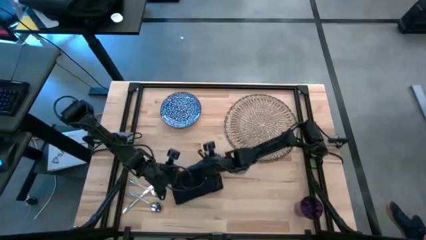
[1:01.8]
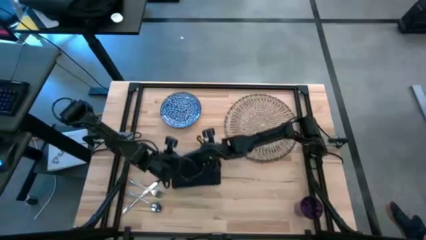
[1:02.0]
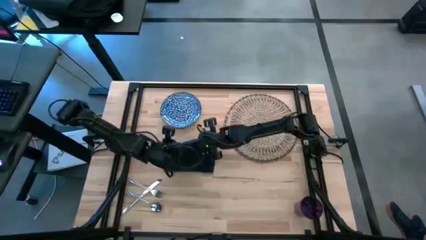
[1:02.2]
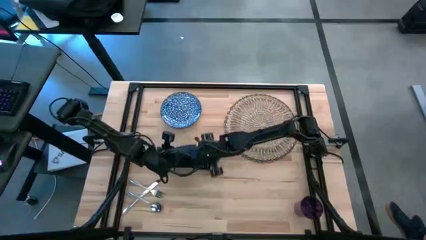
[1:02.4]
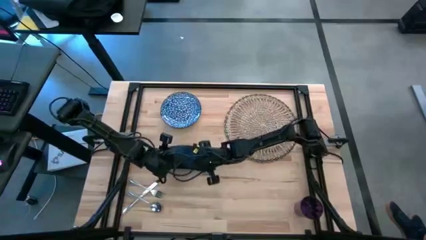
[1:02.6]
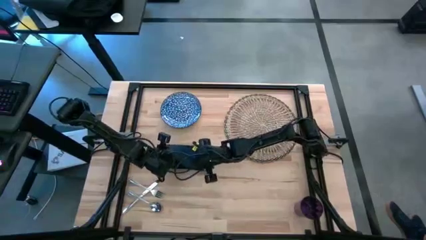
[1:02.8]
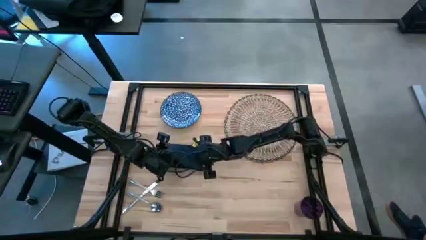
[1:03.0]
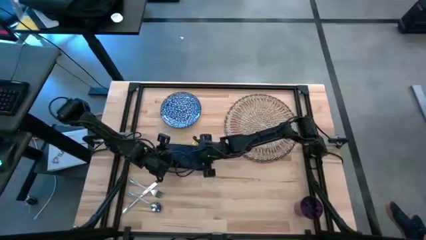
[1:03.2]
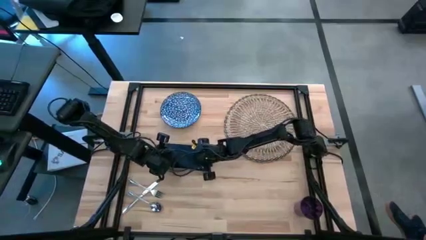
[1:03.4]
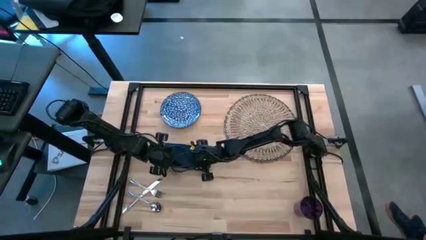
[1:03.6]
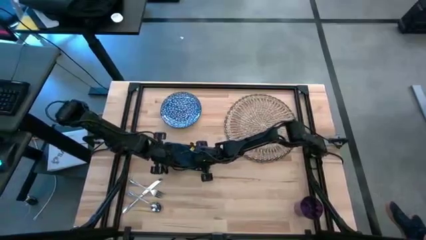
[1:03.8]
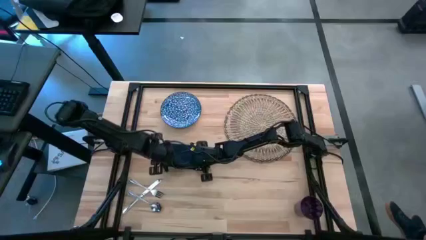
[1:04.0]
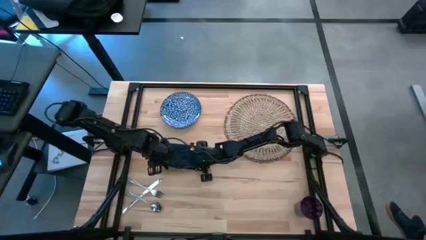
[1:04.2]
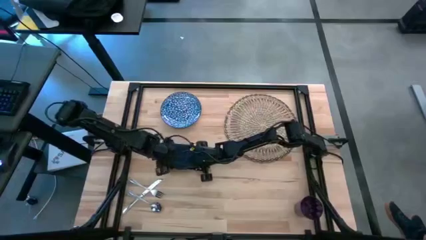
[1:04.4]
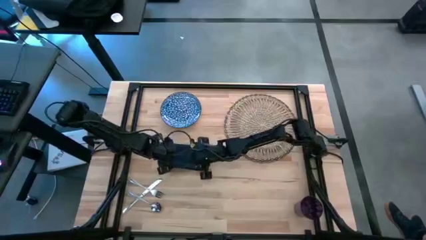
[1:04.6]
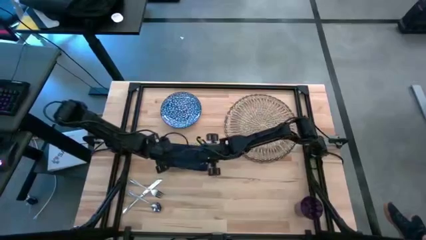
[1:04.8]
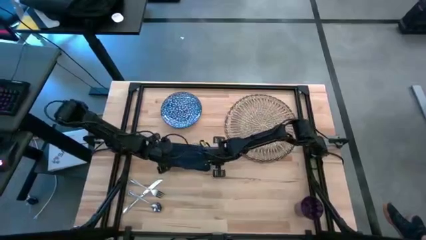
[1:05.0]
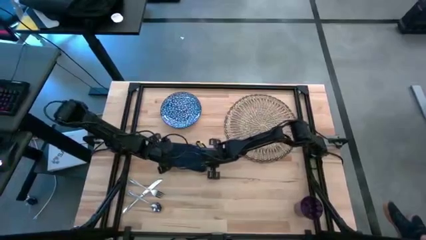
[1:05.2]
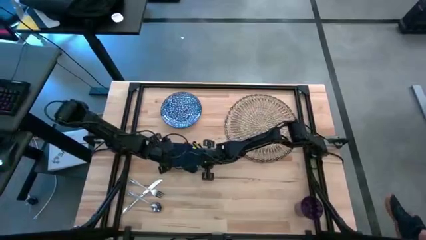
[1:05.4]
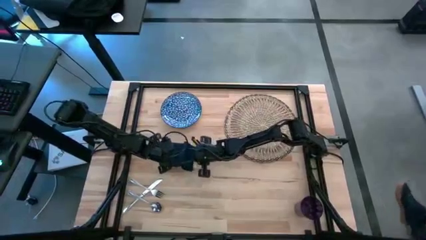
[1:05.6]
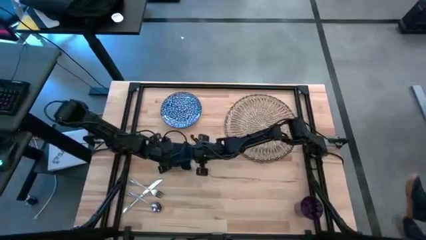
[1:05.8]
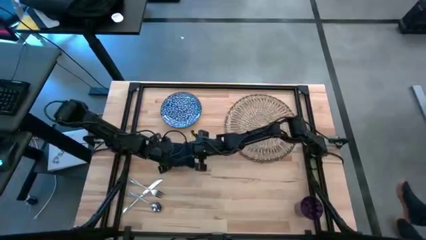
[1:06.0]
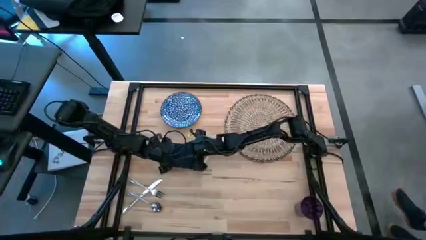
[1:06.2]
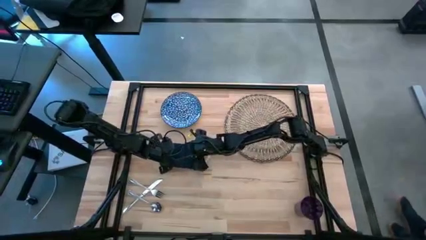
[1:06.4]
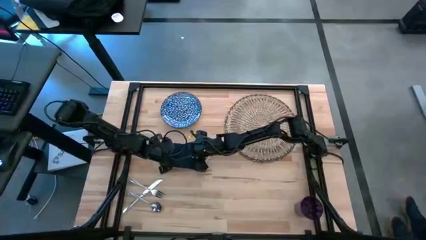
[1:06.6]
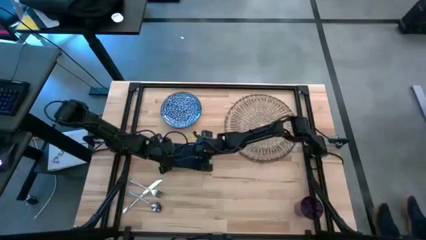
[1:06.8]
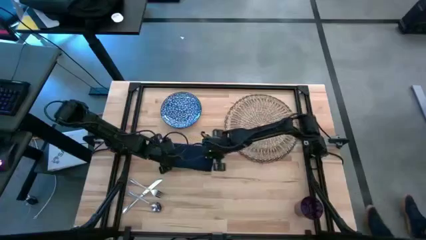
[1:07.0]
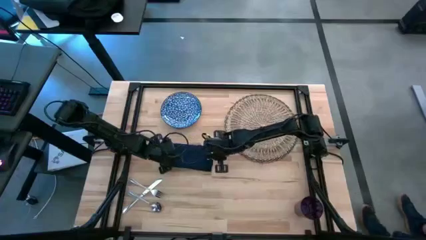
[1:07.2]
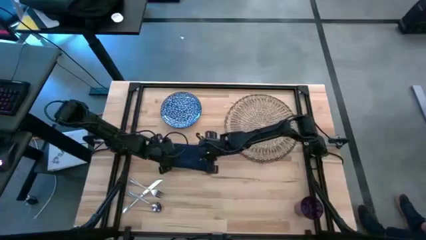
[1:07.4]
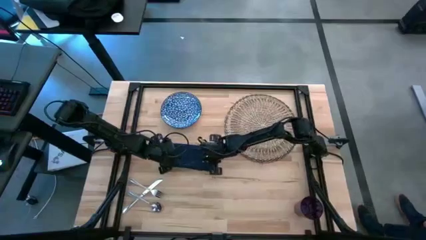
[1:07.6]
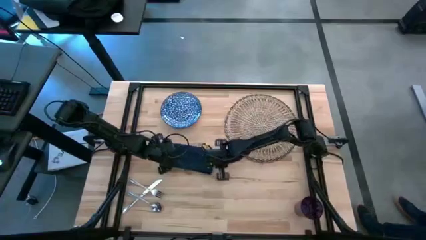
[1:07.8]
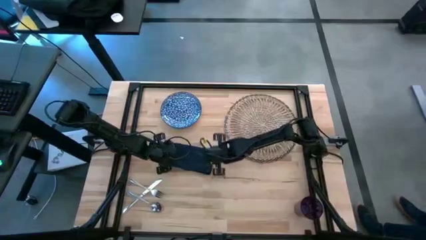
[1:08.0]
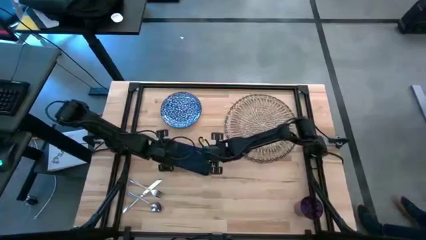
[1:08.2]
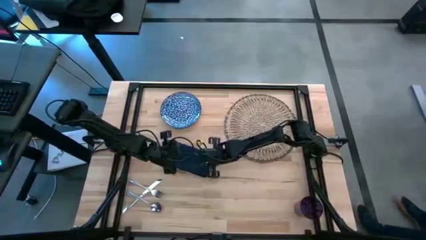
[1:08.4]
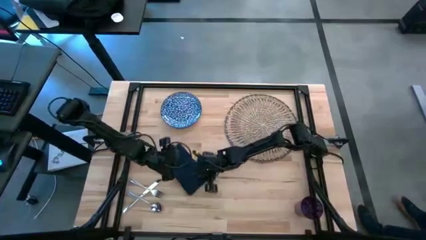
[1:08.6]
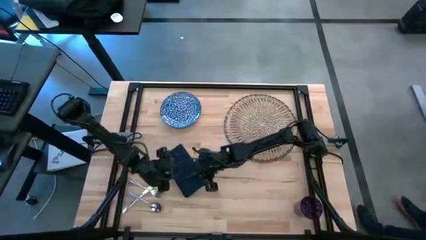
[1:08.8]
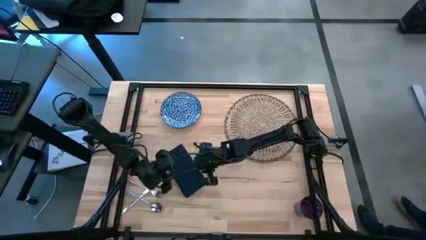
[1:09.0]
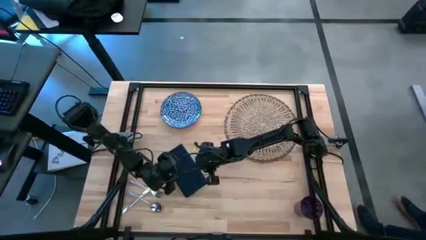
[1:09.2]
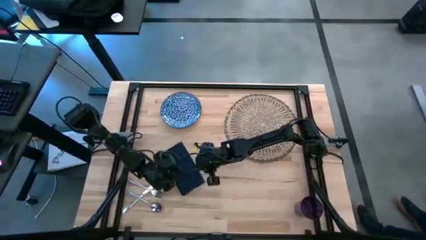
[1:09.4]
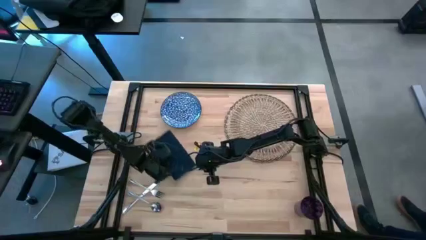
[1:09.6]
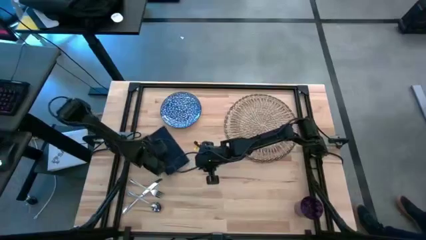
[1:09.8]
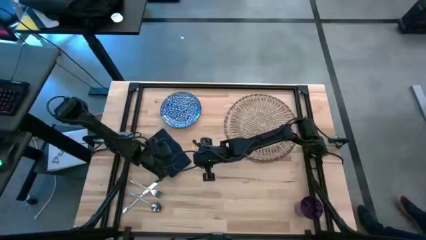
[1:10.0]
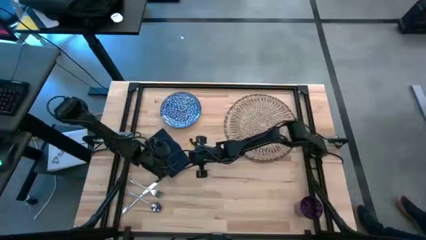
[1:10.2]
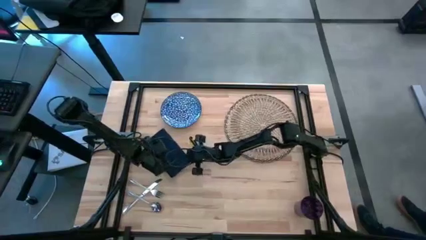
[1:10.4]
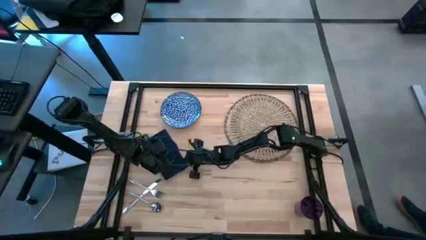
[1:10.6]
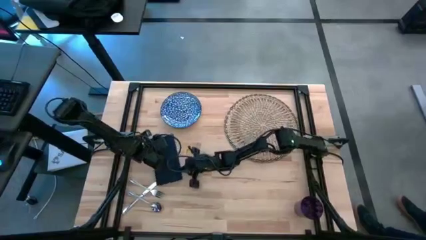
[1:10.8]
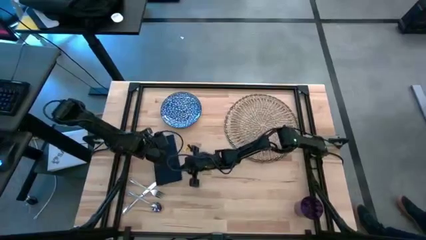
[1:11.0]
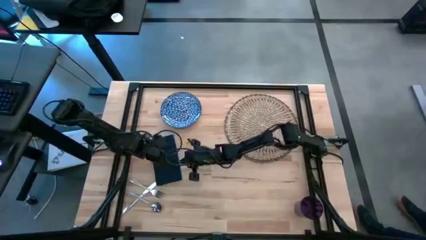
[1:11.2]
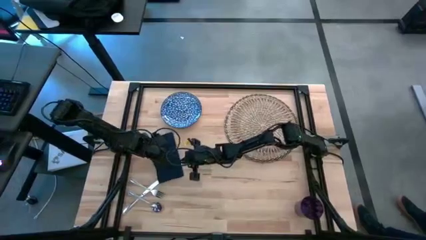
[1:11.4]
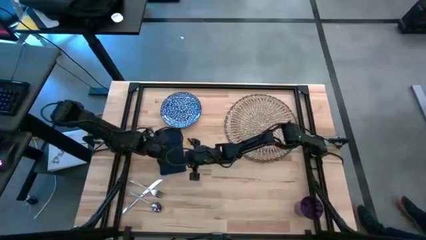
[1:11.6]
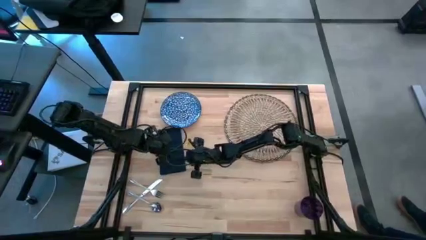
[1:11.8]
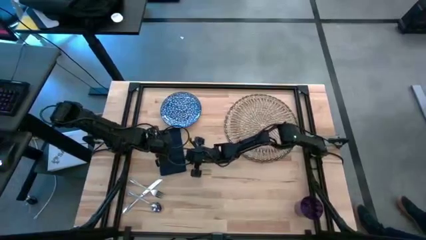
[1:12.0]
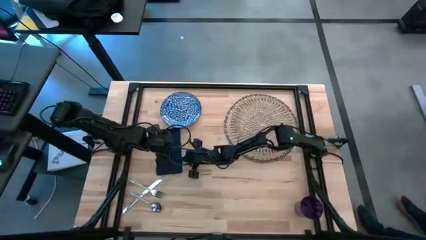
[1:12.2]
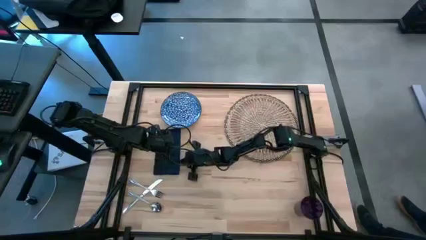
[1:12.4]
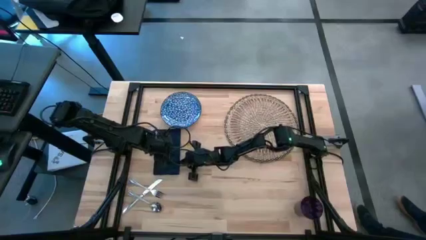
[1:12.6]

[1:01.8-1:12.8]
Task: Set table place
Fold the blue table napkin

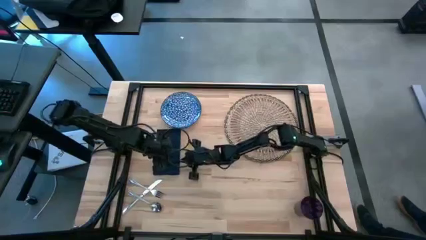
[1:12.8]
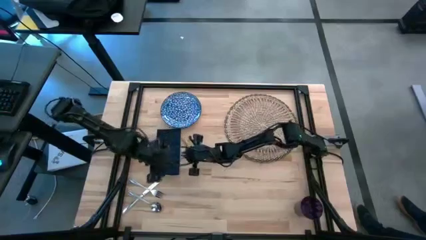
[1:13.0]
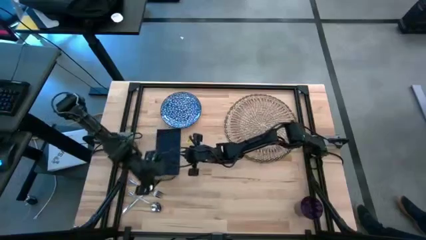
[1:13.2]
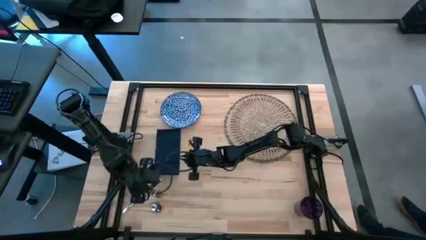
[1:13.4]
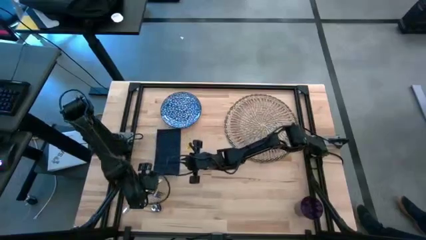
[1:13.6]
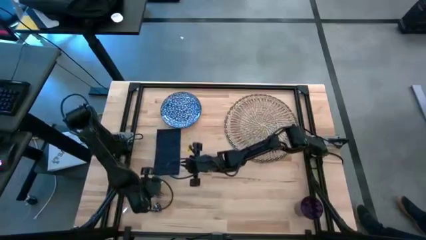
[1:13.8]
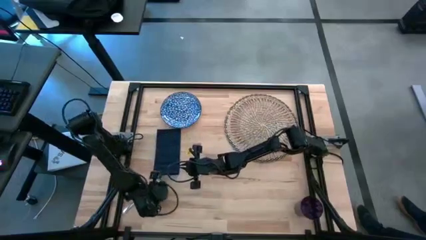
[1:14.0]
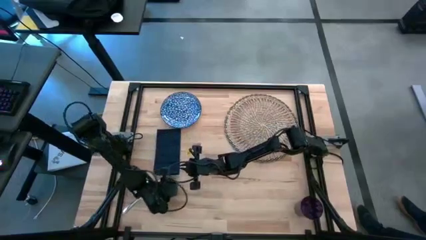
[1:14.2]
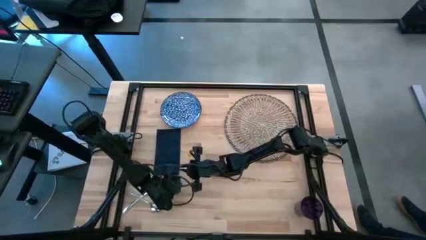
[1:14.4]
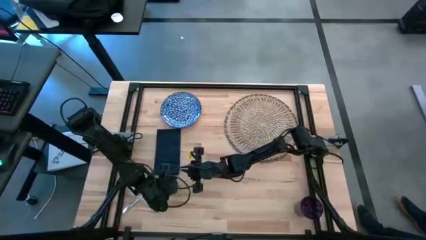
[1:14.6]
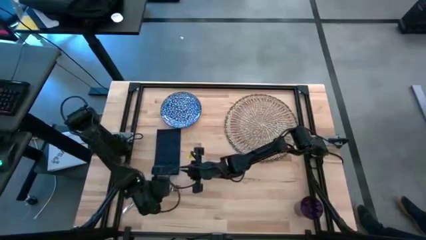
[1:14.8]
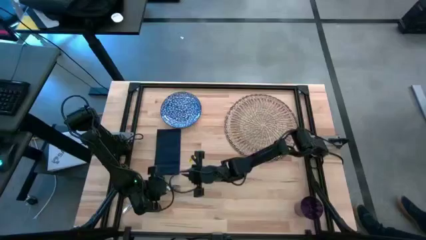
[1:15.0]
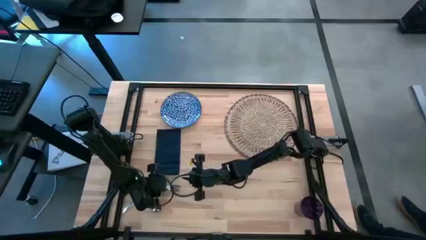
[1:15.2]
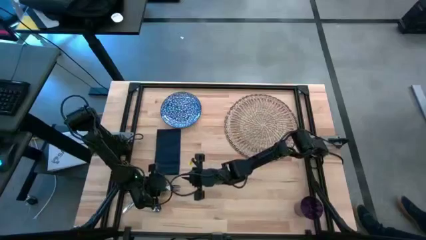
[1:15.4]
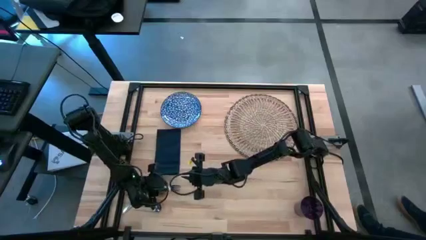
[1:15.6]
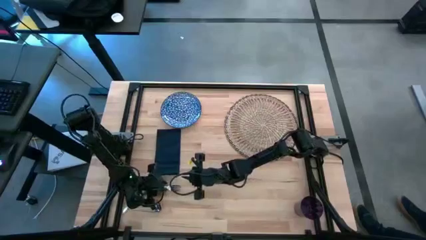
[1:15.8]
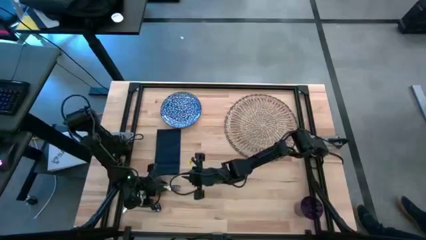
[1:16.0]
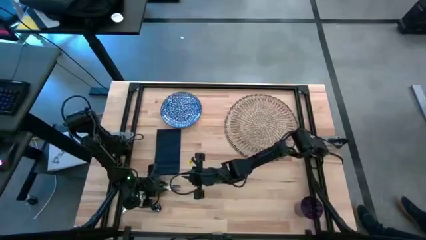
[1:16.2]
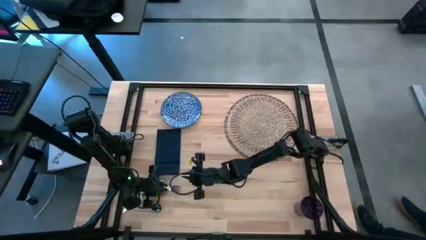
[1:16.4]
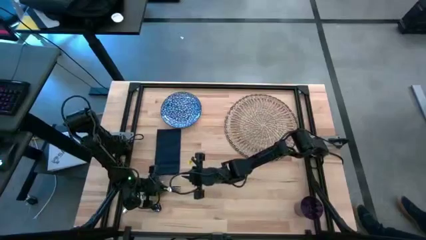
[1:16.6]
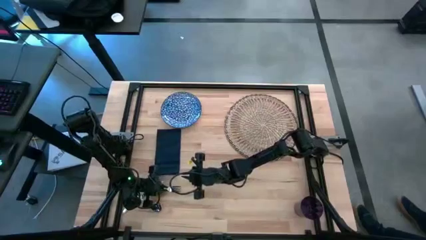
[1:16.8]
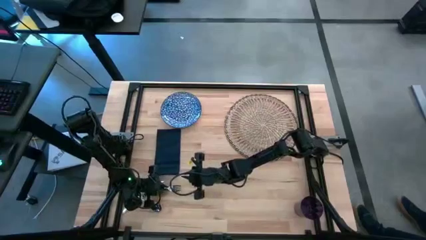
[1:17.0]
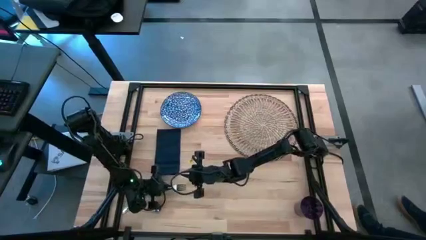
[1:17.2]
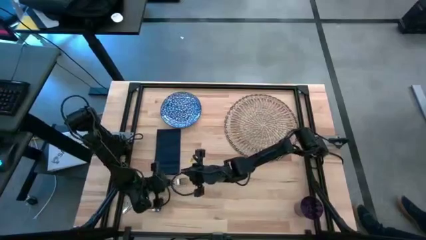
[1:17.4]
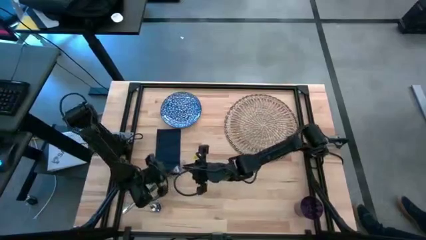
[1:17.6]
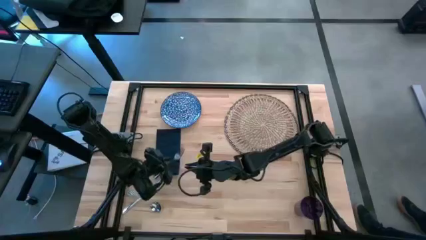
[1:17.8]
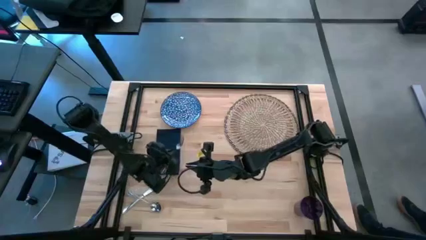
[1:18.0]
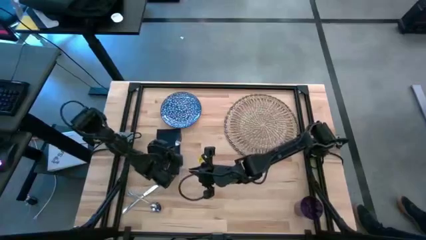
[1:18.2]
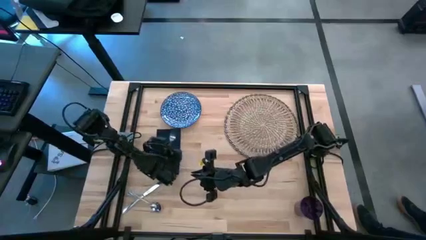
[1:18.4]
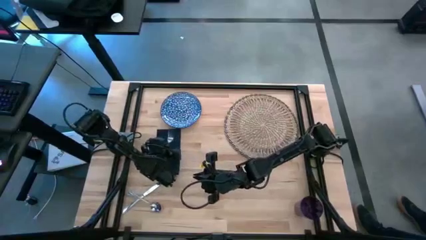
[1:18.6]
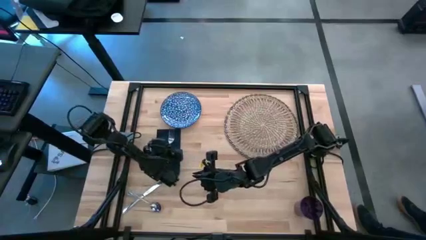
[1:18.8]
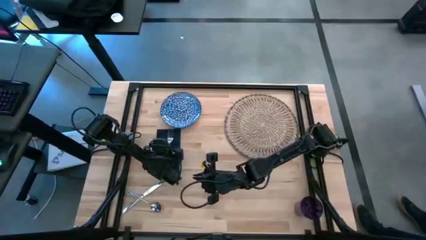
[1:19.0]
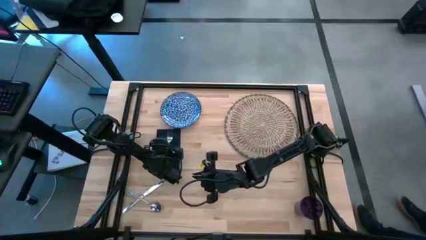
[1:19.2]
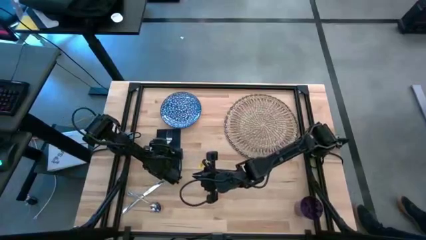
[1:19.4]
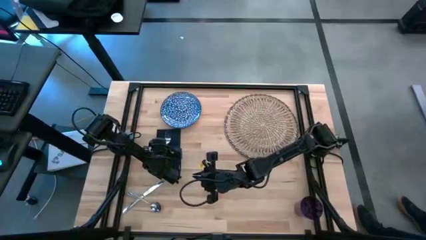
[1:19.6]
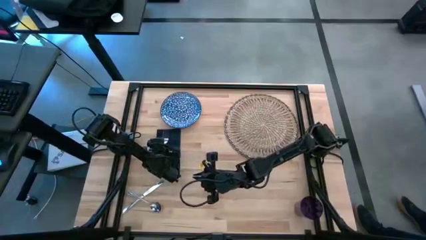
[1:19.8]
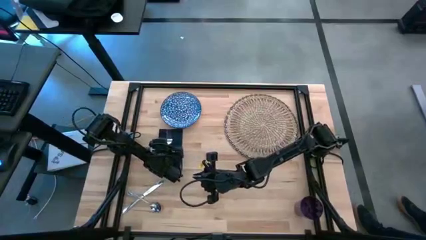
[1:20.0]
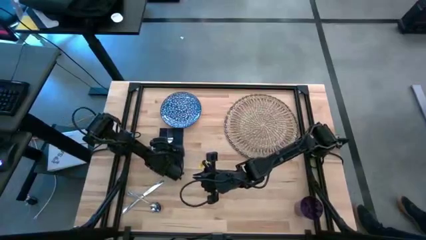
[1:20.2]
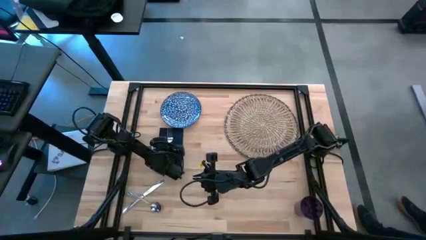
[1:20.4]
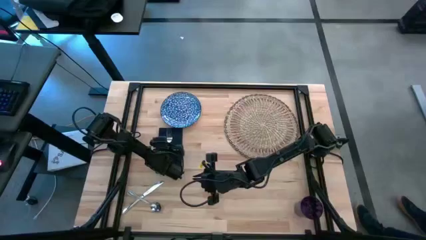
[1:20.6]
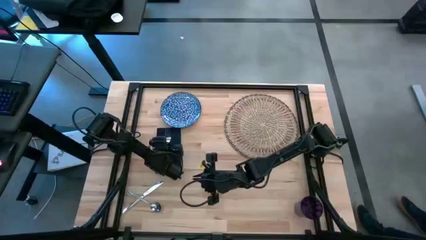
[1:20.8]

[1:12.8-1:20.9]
Put the silver fork on the blue table napkin
